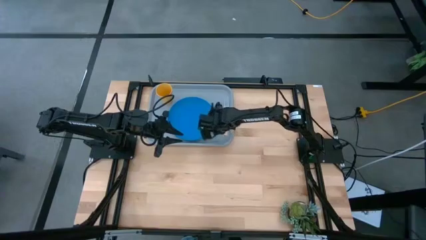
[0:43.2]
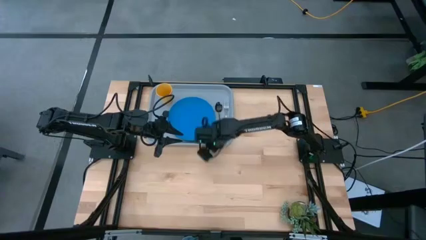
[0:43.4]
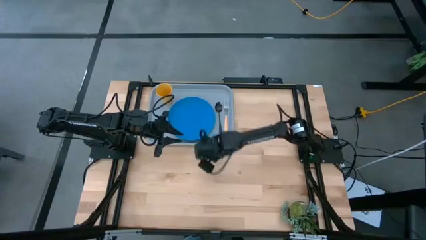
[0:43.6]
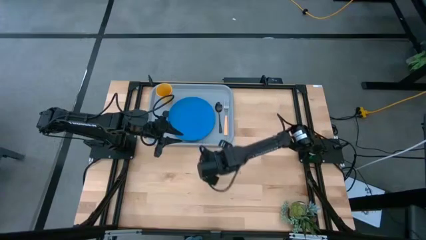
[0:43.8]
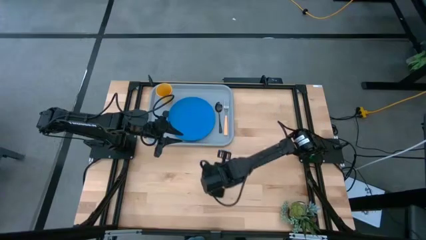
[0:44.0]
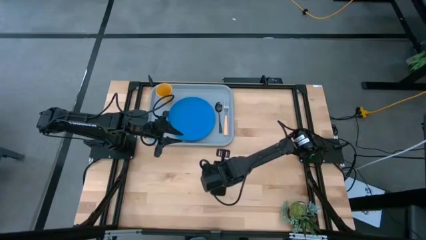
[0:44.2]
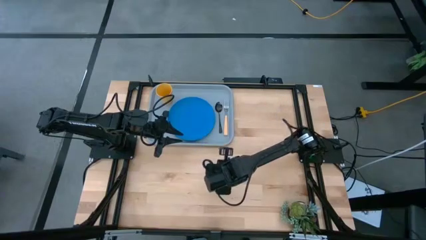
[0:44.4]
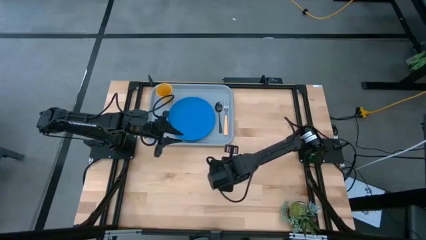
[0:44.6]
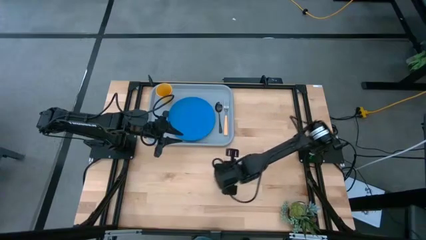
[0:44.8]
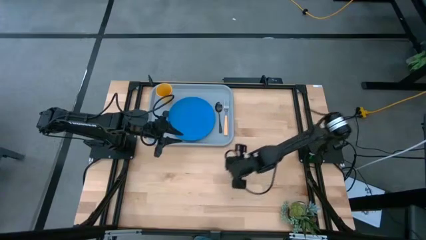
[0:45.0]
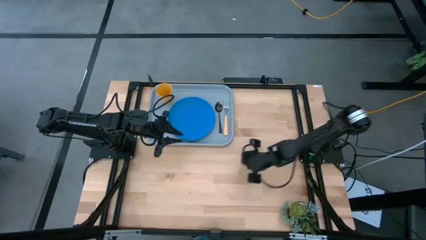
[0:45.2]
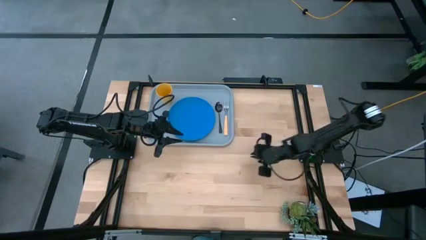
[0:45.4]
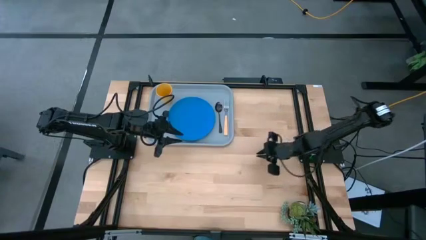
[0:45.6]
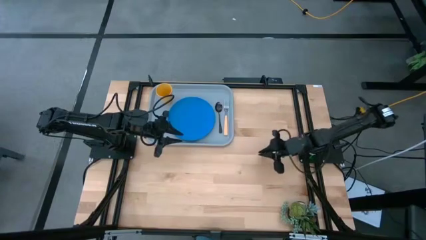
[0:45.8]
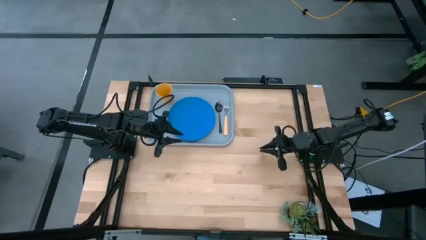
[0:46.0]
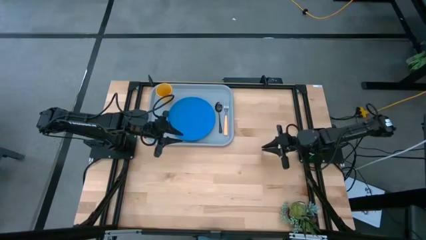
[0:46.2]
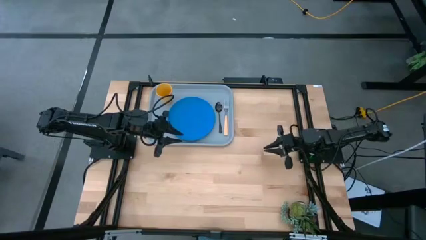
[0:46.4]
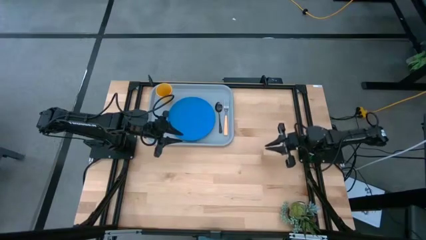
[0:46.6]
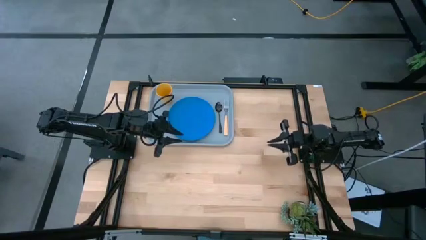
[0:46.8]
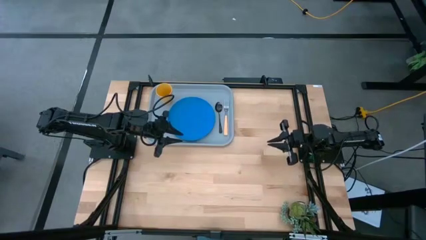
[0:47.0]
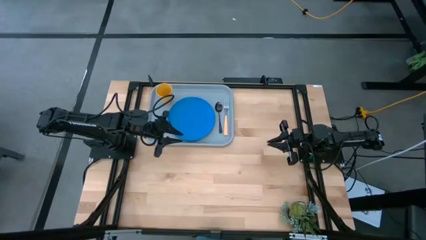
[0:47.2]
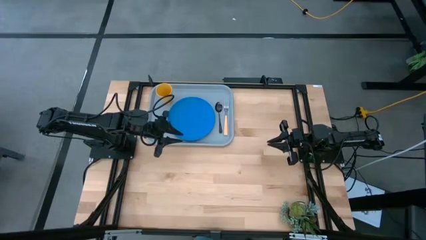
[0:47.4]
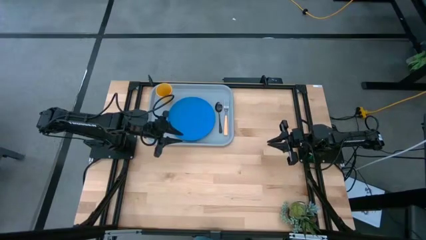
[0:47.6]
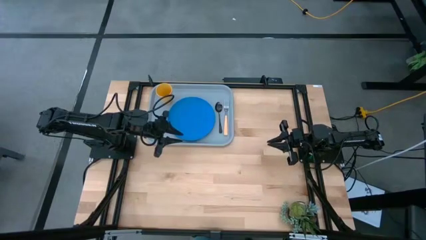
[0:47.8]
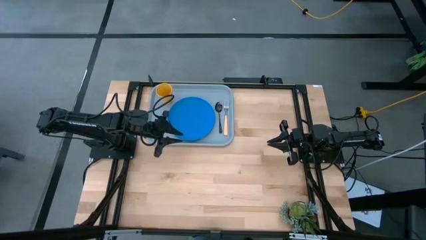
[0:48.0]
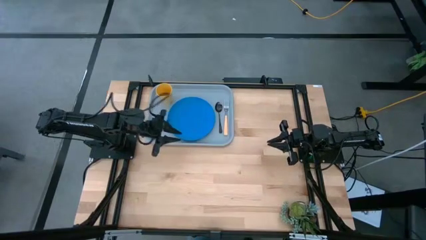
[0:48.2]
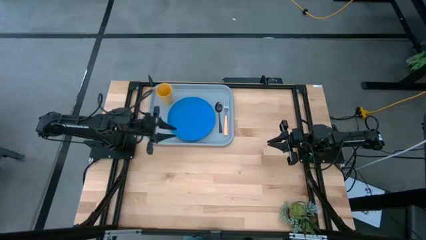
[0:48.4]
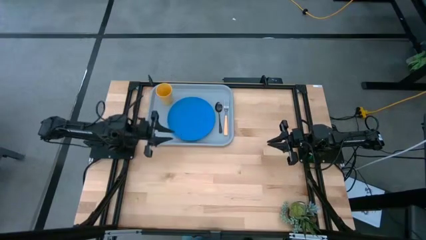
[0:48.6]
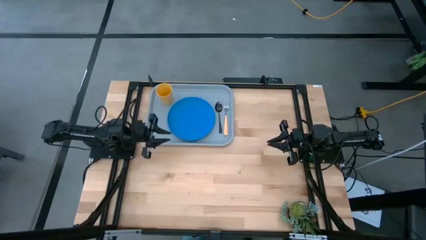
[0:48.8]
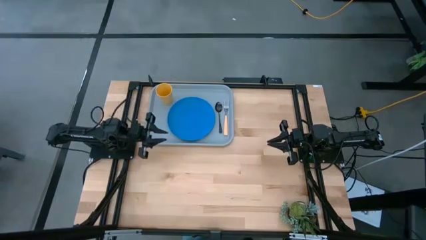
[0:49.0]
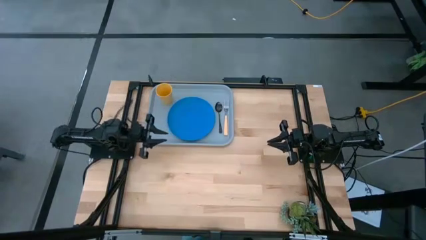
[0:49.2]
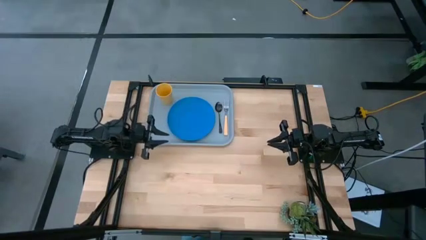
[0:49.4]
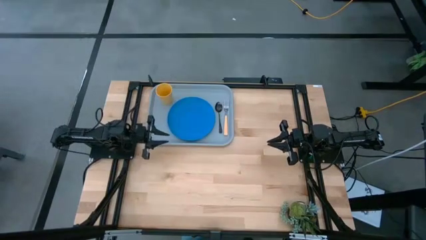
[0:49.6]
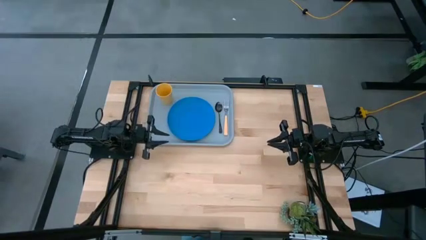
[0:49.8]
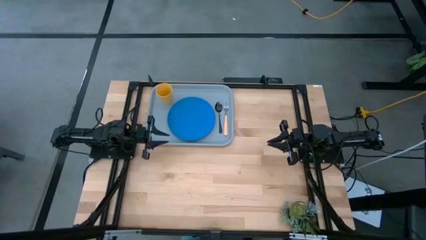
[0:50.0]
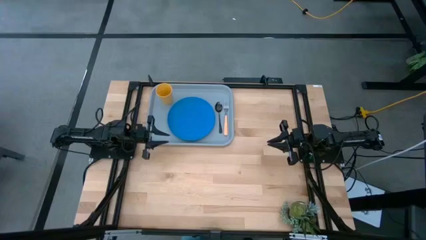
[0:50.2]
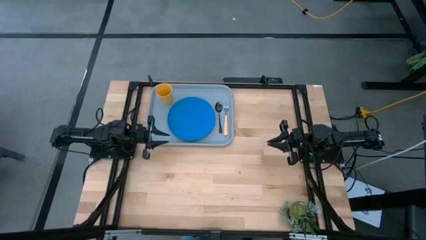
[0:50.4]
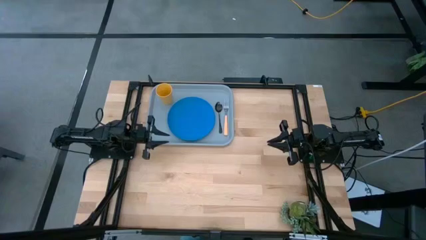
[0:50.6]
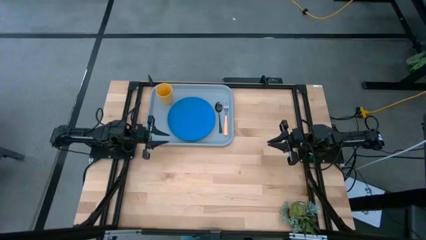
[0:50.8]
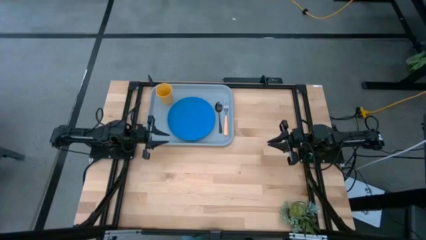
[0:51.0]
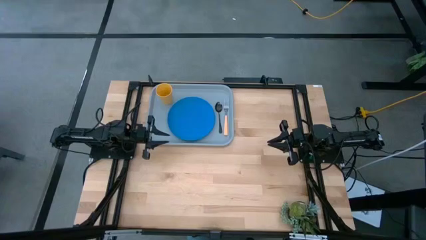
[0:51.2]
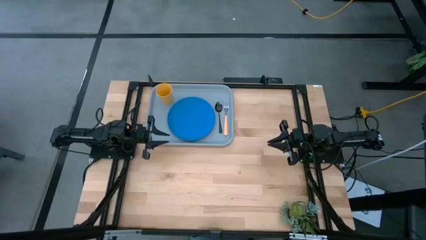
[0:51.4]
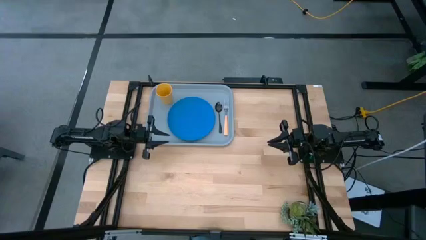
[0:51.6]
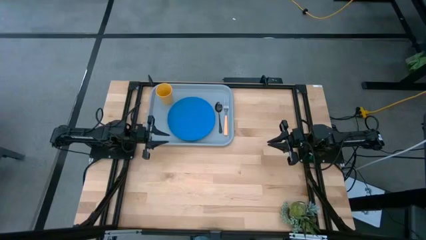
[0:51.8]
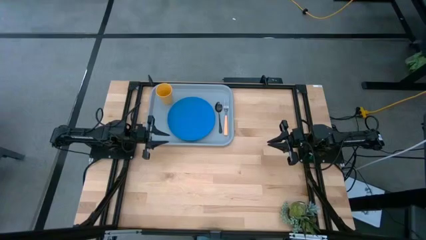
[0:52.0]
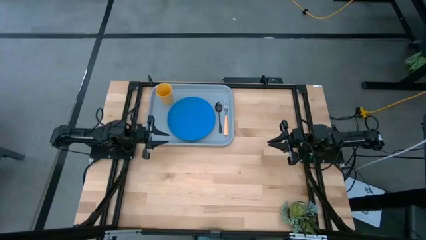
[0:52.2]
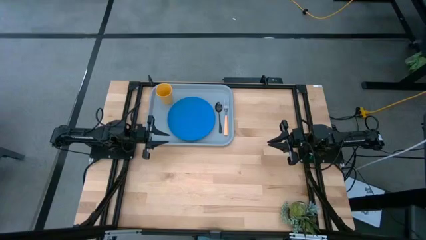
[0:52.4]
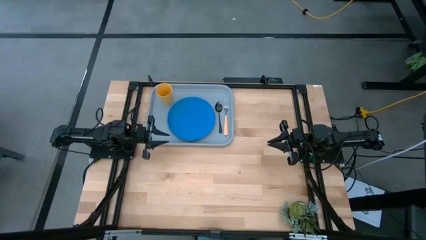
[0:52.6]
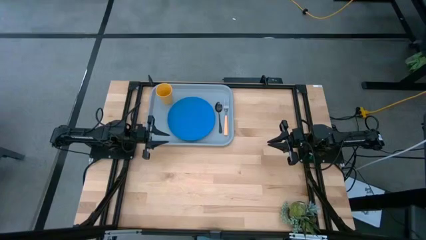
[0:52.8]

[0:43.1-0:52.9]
Task: Pick and place plate/cup/fork/spoon on tray
Return to Home Position
